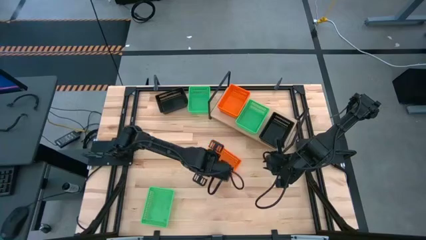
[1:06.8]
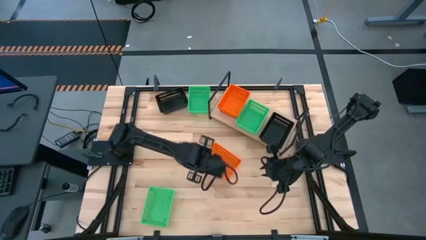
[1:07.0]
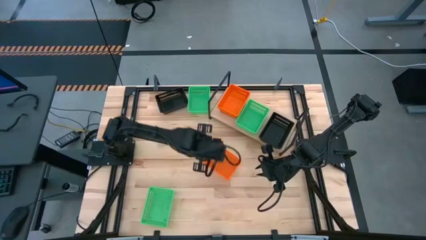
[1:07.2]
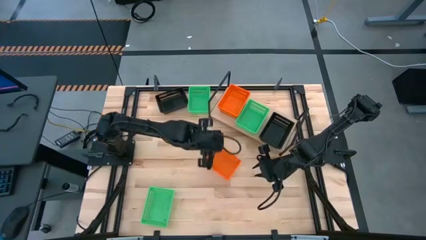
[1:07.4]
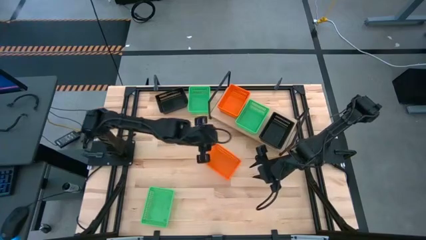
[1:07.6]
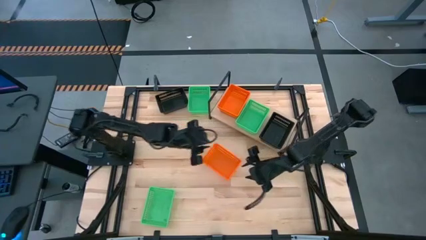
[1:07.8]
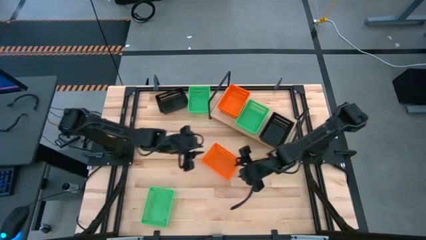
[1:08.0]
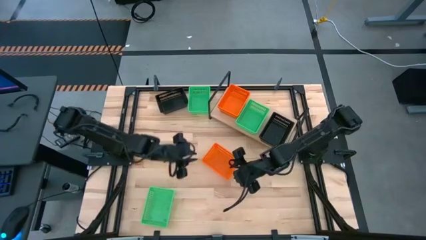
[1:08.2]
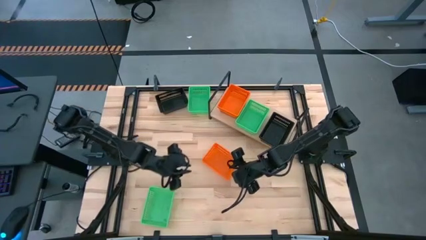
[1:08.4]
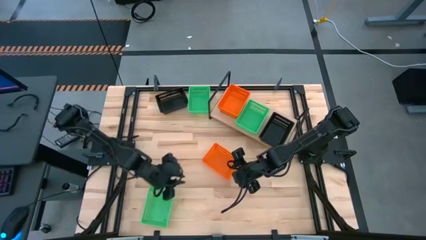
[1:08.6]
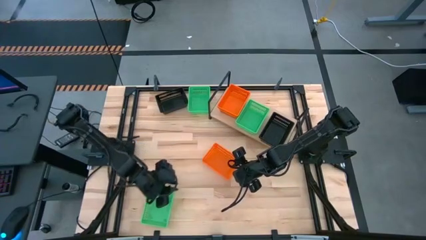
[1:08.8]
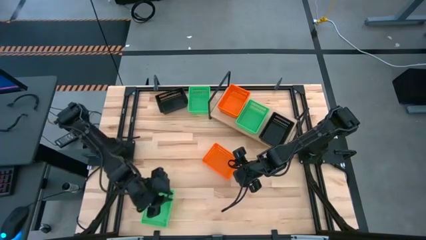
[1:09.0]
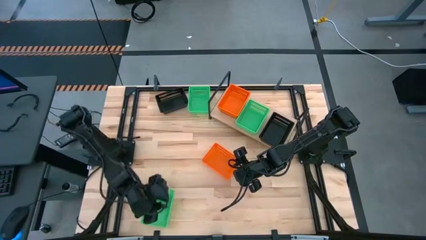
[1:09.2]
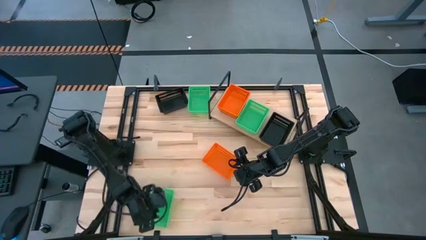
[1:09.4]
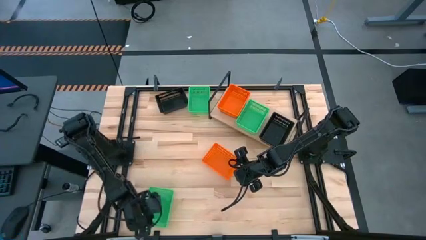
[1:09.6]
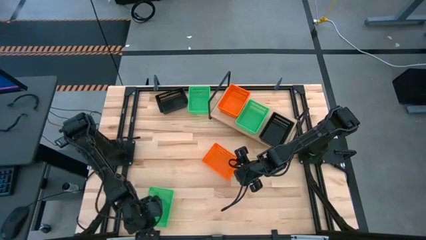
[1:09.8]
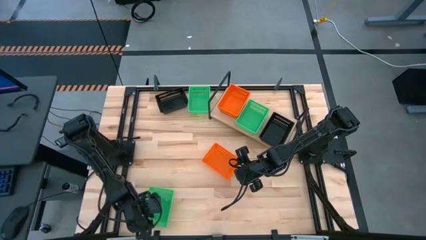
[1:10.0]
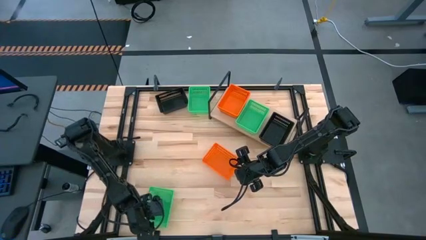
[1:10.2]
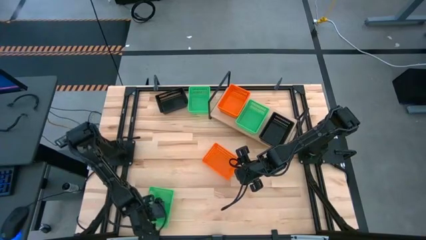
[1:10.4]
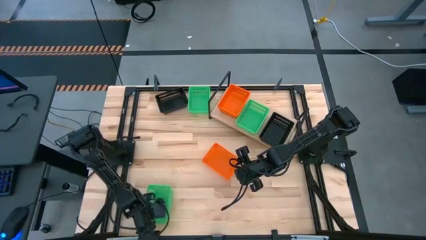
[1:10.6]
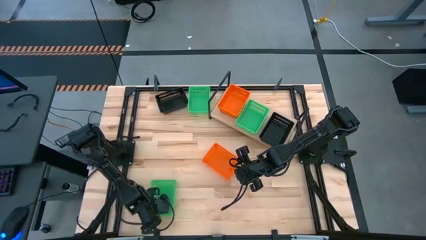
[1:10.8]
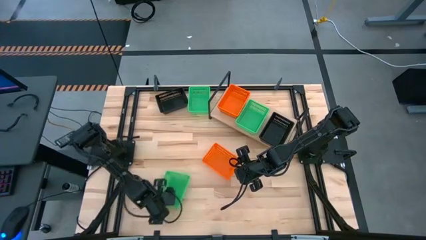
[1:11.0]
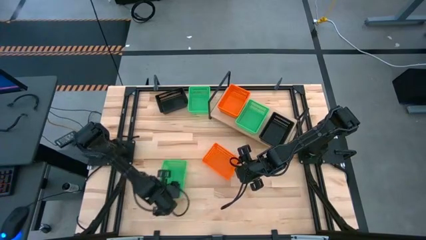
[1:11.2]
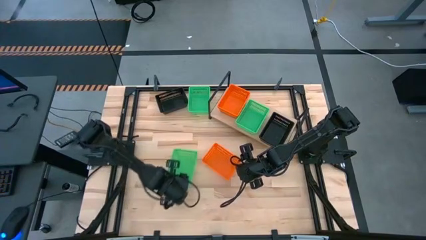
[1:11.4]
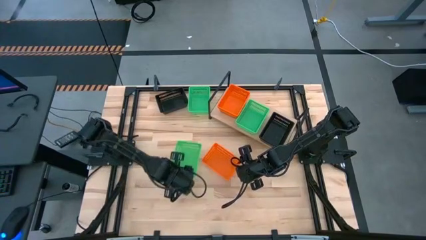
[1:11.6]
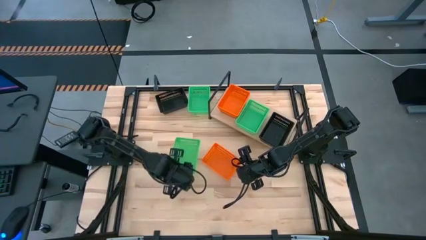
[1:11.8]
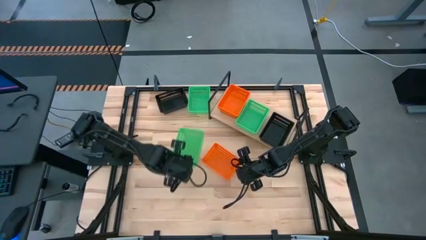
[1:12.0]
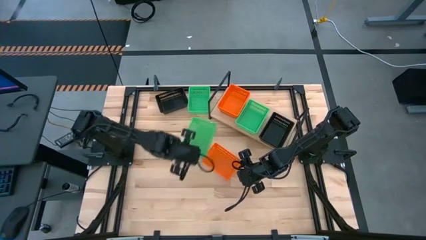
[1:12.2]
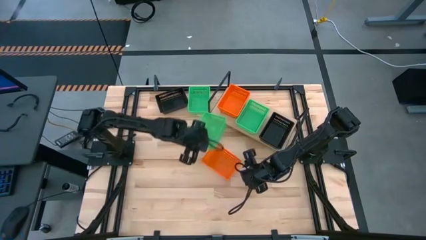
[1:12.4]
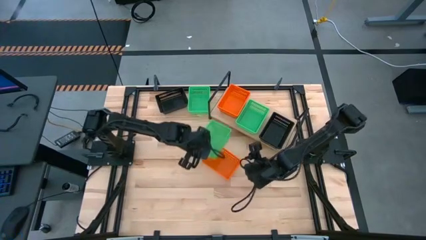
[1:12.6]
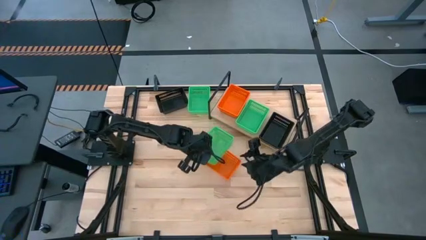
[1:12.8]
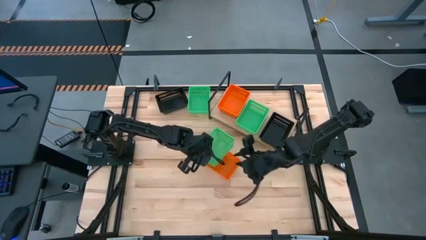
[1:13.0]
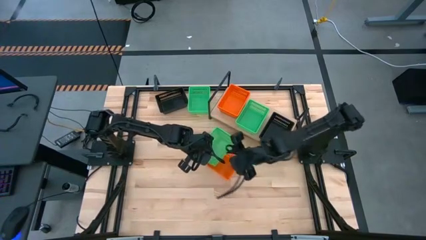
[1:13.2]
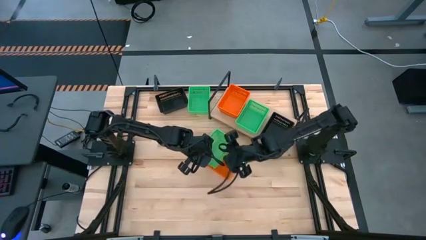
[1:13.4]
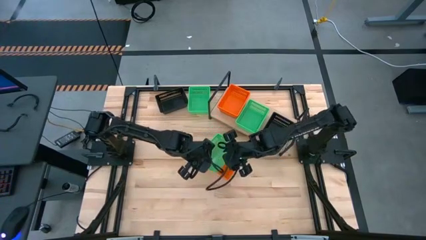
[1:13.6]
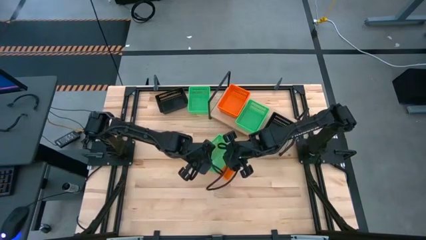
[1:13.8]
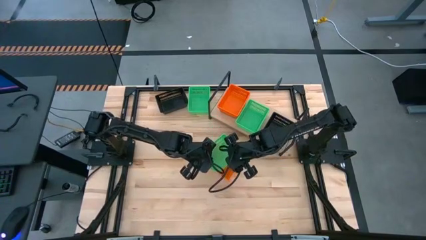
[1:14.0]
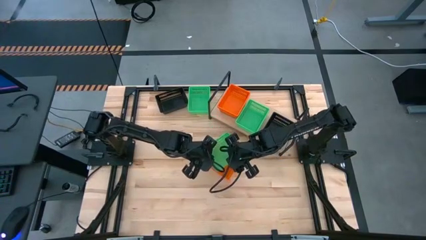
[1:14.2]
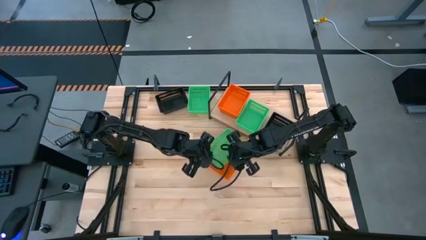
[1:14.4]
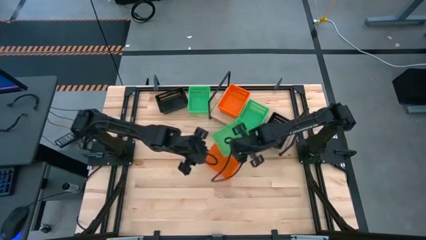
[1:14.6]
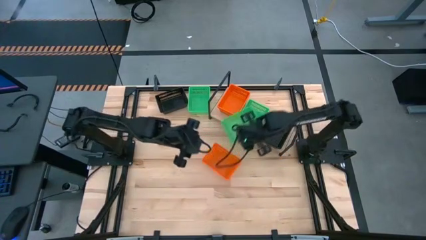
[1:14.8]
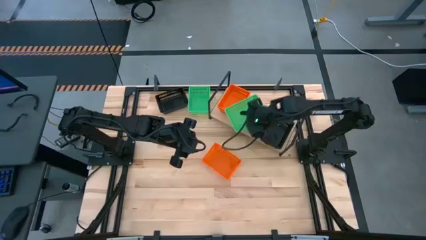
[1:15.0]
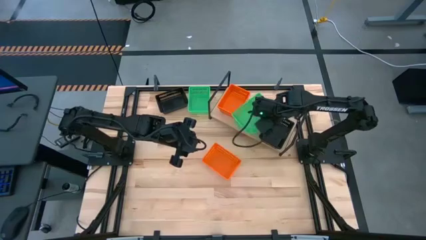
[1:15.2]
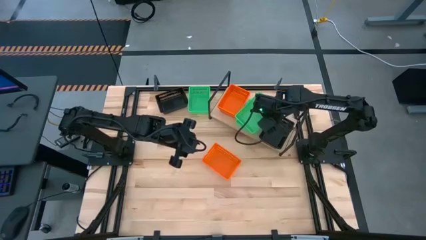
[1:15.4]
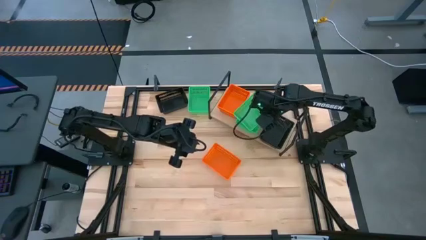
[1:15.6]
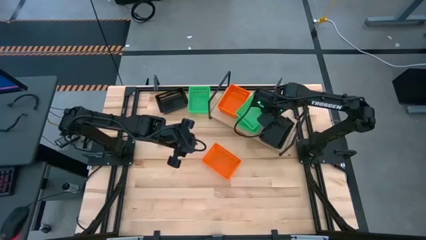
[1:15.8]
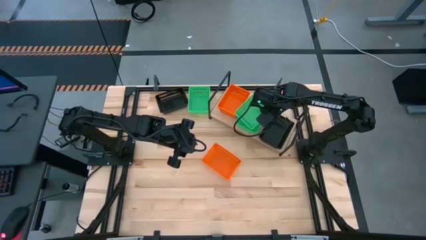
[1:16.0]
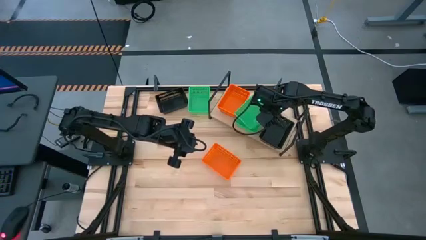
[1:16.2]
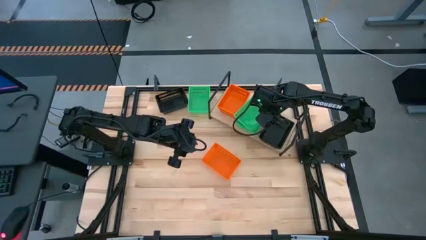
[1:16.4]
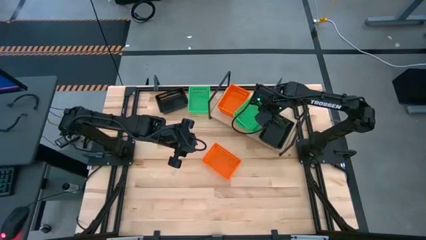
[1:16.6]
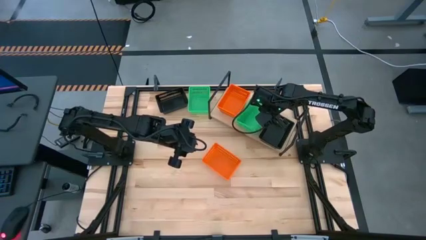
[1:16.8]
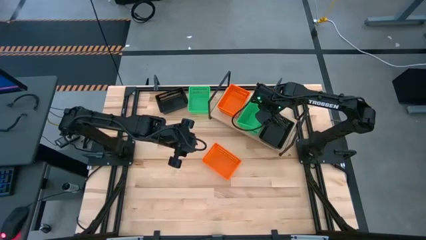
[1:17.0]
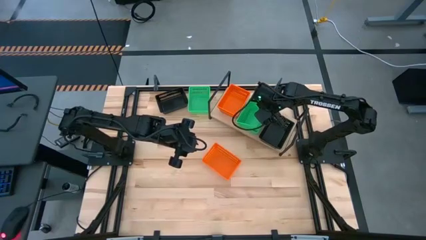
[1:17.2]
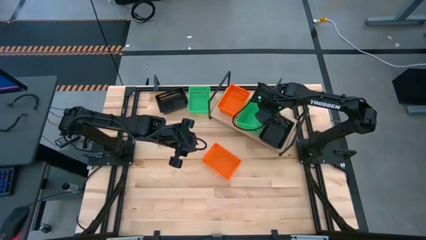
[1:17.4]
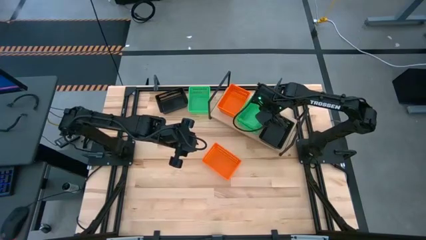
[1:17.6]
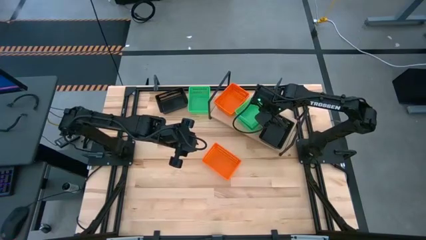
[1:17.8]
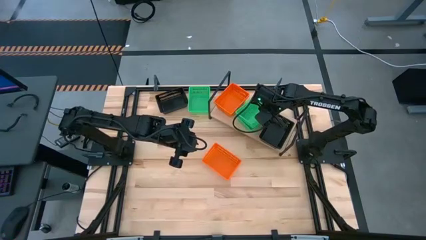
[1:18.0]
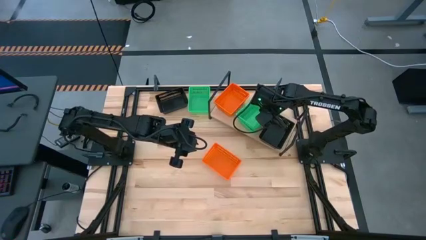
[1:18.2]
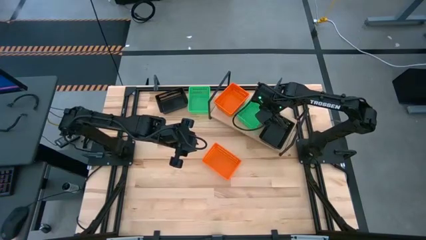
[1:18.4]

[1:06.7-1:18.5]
Task: Stack baskets on shelf by color
Stack the bottom green basket on top of the green basket on the shelf
